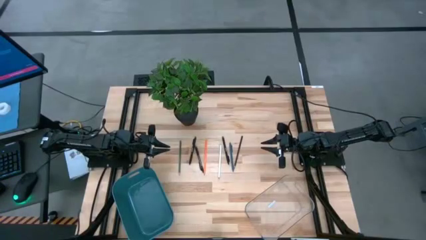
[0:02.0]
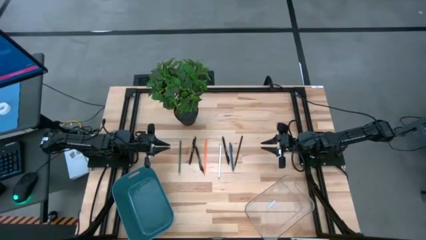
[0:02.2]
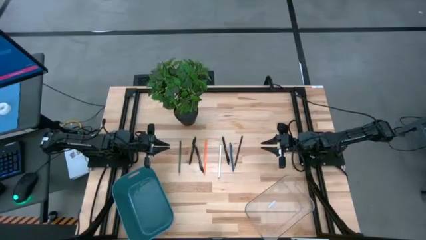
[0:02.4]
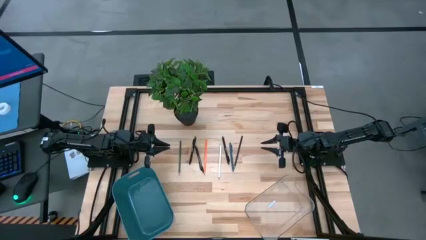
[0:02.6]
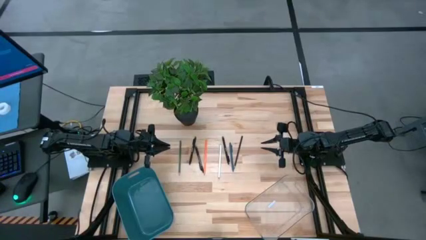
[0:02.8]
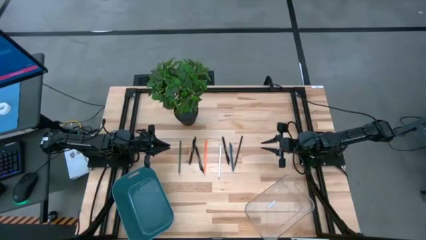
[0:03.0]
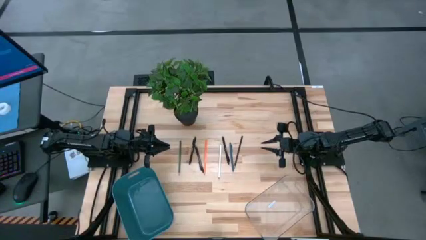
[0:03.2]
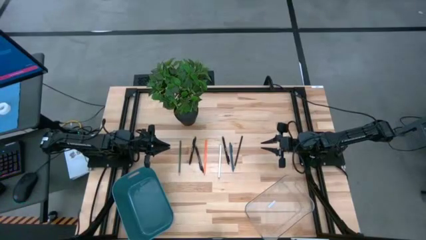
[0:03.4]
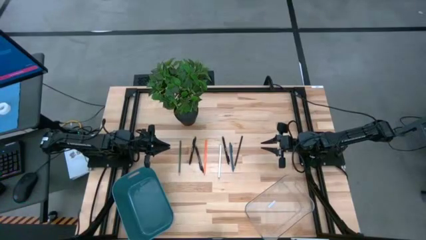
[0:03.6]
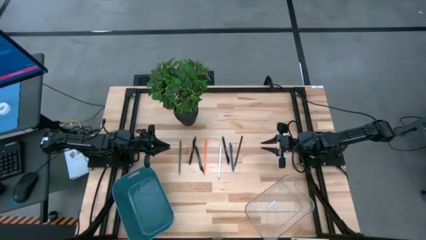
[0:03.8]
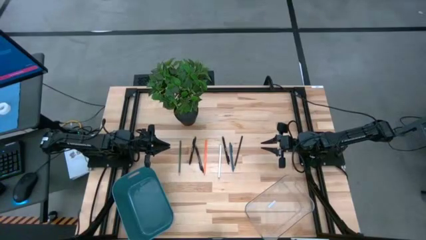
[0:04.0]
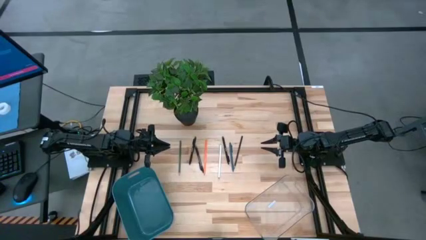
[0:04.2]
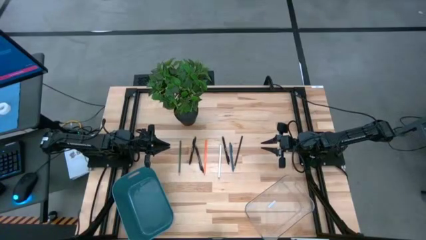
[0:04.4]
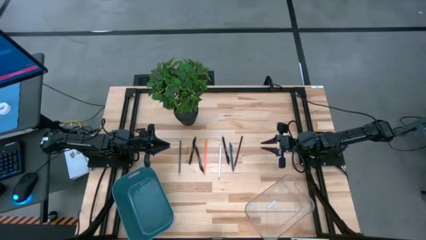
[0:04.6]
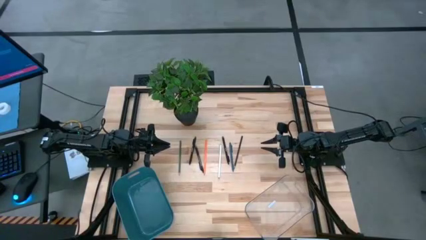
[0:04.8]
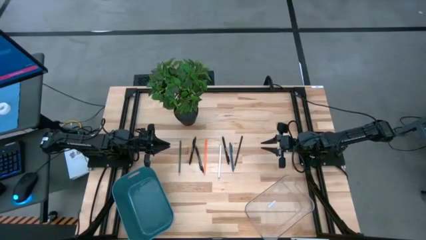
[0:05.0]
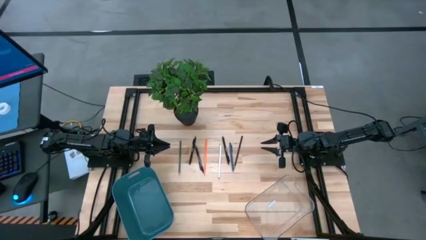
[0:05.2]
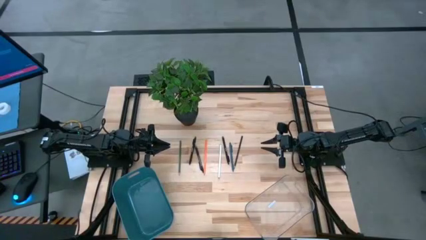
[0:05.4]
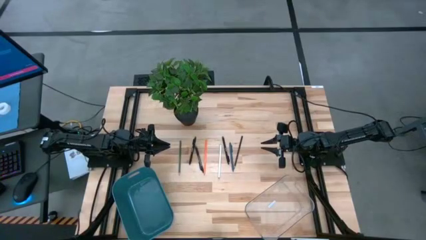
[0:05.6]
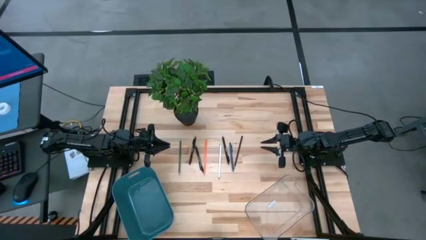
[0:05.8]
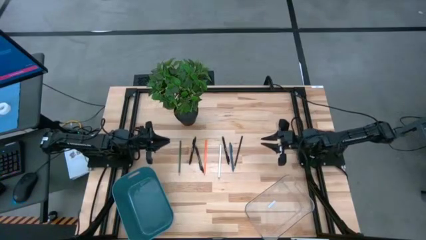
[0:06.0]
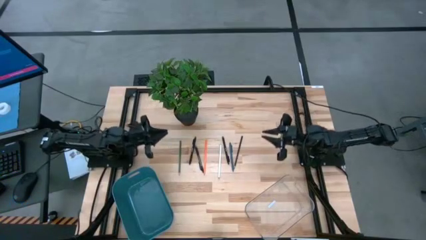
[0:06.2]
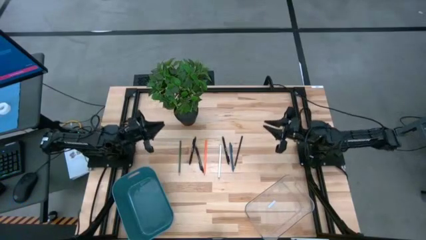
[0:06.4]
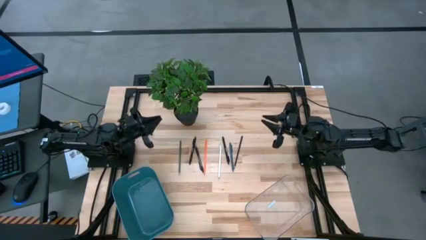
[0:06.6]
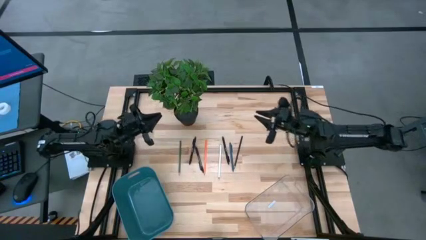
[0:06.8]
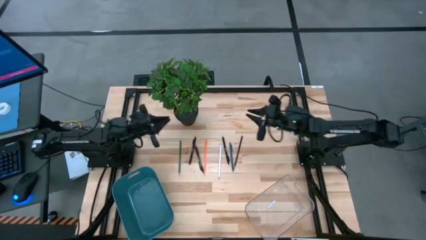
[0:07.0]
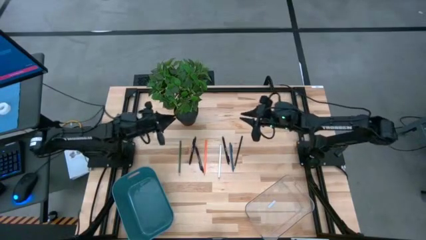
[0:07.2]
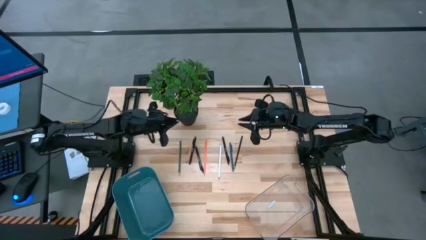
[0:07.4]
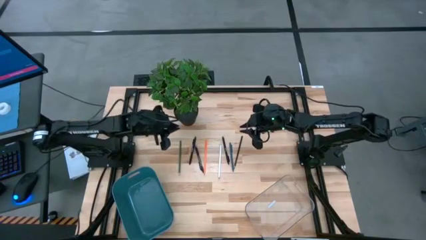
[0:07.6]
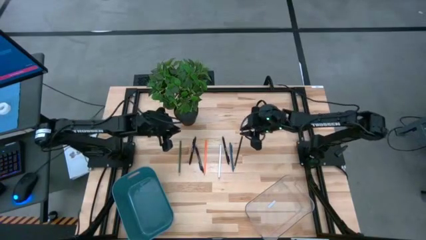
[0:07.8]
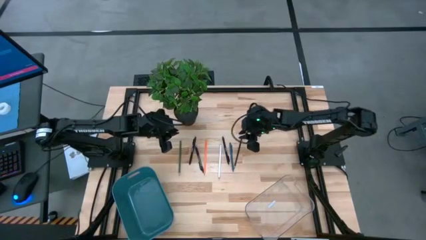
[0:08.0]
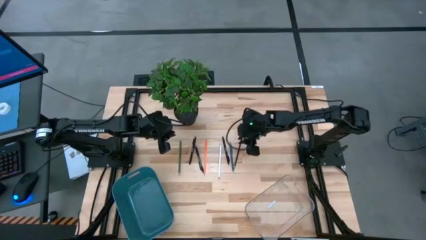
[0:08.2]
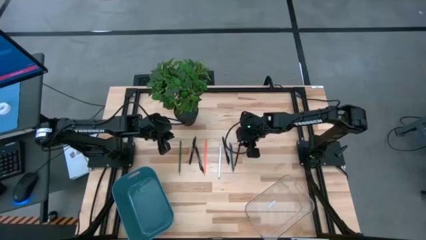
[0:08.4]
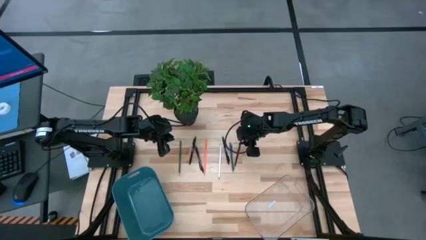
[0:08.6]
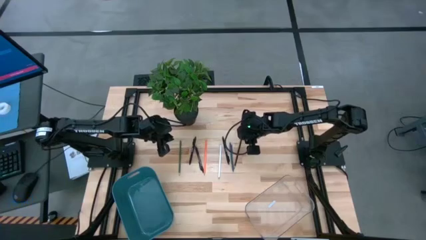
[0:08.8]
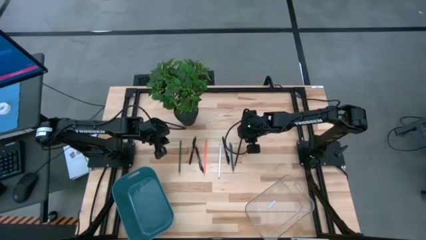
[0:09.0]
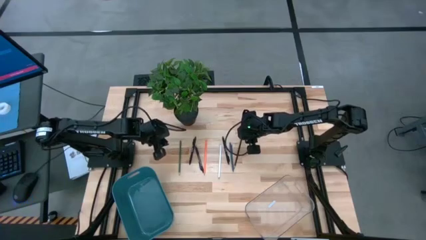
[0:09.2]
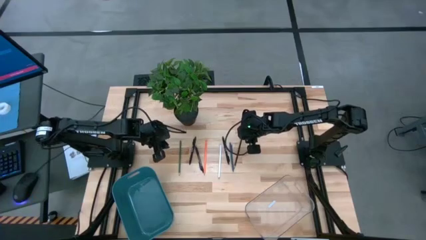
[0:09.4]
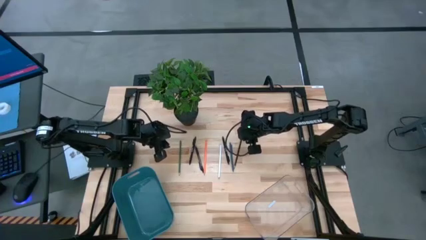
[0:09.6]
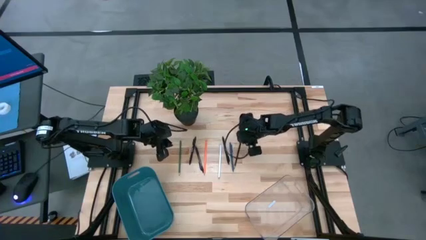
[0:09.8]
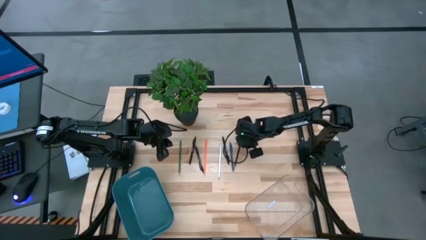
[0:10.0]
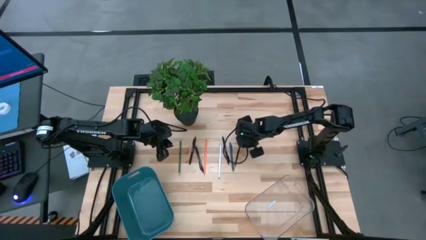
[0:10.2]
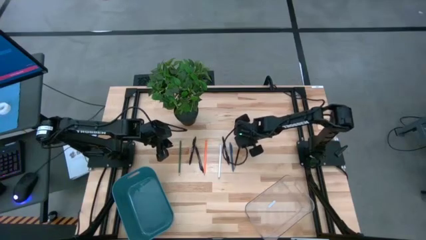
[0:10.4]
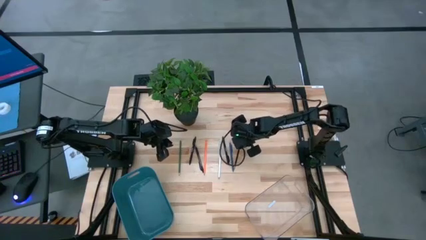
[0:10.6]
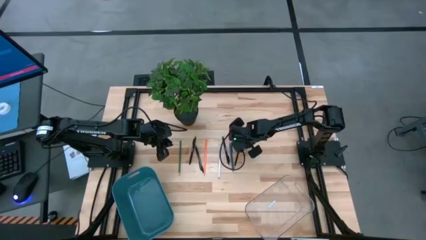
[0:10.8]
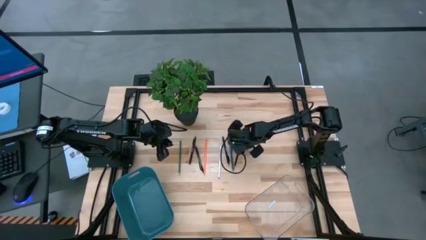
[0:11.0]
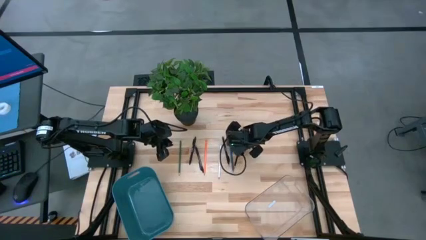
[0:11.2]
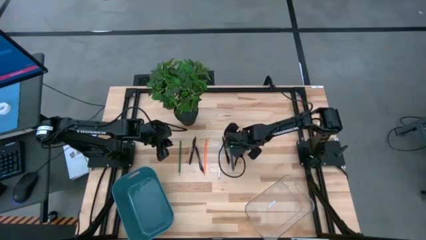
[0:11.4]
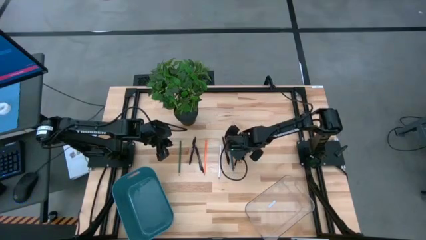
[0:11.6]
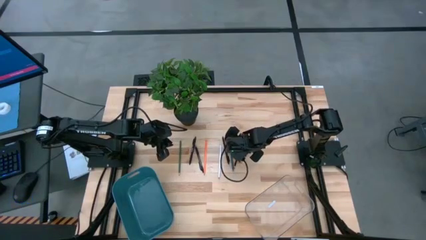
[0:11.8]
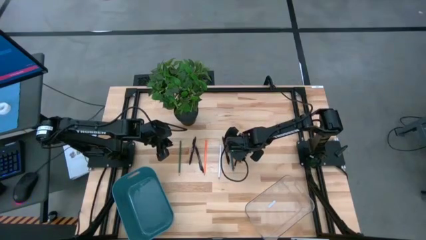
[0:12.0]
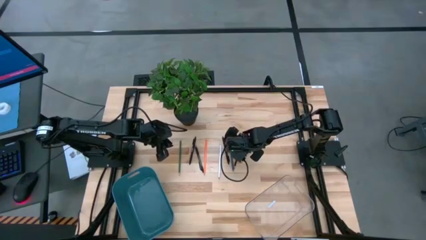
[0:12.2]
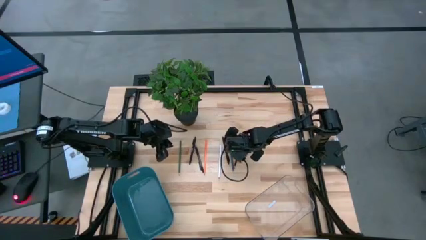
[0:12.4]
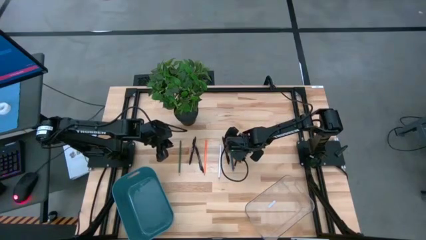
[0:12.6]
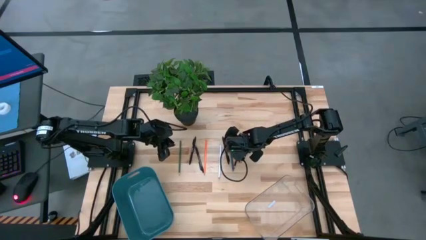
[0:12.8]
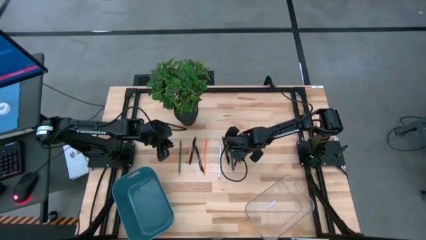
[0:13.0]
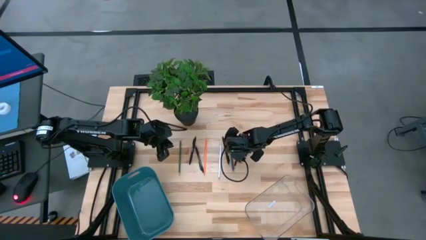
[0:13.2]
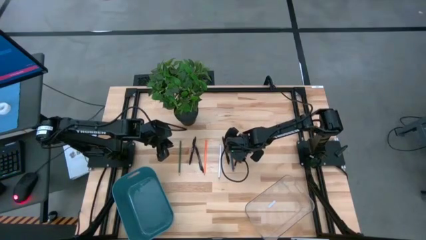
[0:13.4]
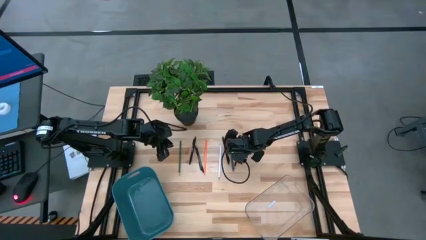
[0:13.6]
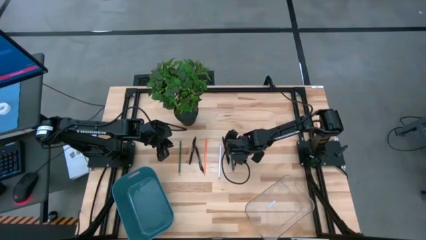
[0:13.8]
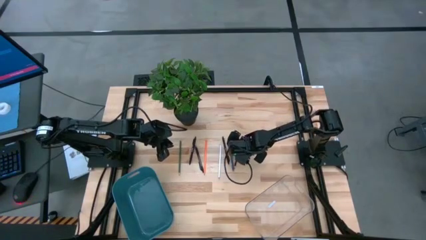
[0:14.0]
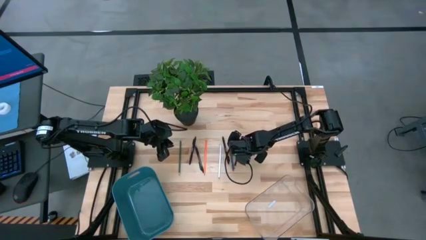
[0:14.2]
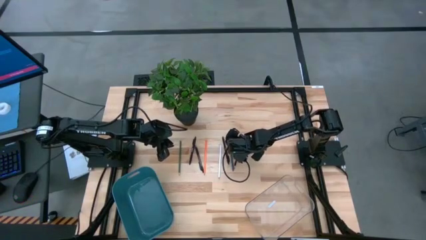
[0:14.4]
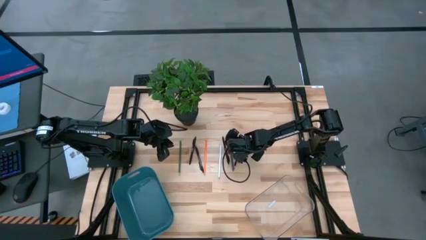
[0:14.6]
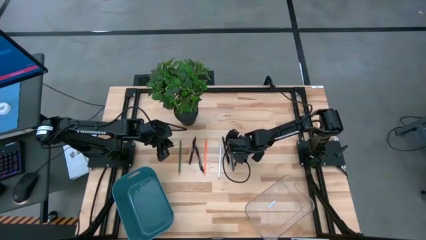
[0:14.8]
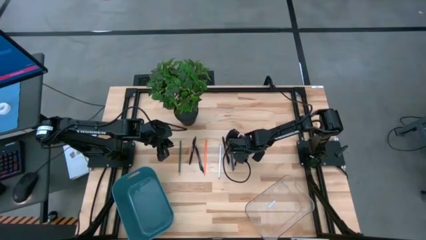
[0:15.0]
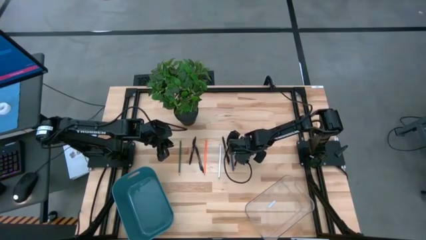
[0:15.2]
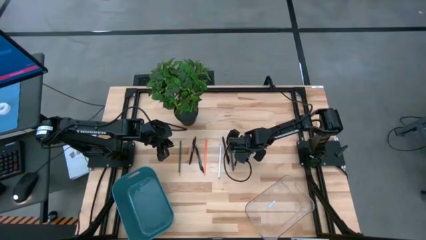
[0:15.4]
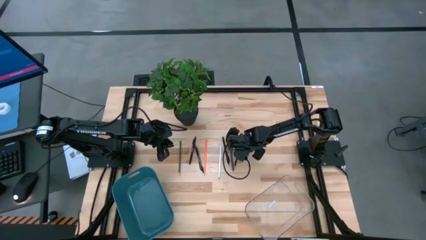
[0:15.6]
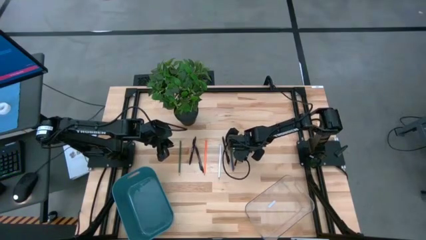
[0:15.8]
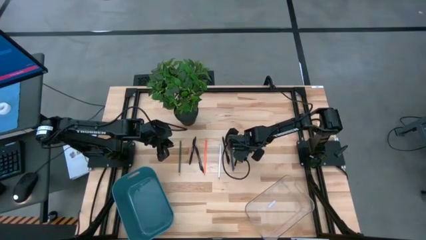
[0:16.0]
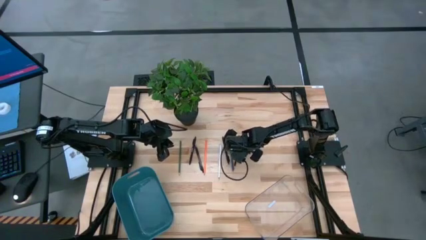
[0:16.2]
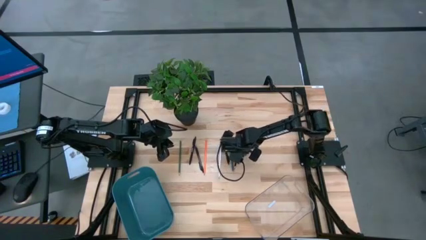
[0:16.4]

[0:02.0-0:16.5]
Task: Sort pens & pencils
Put the black pencil into the transparent bin

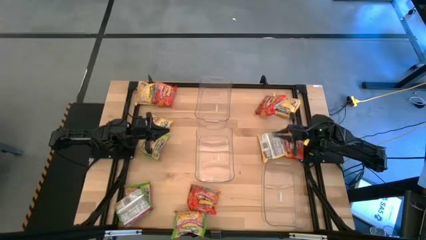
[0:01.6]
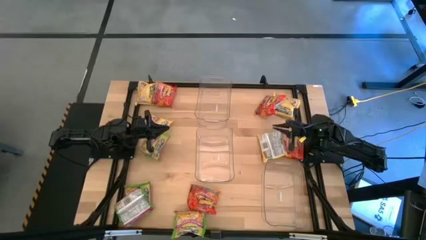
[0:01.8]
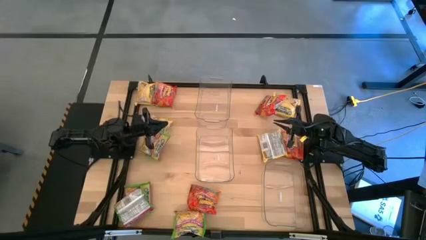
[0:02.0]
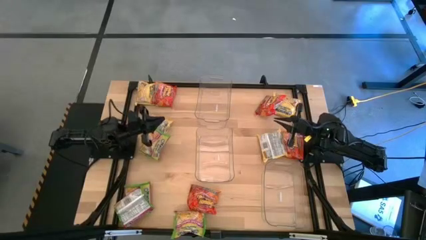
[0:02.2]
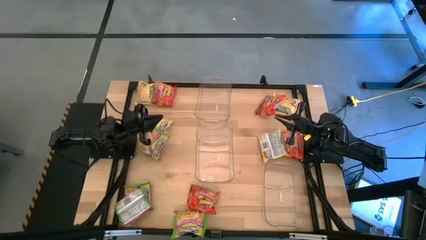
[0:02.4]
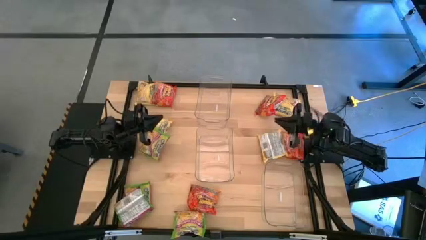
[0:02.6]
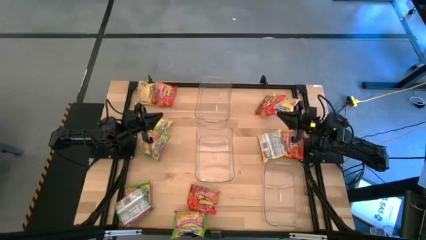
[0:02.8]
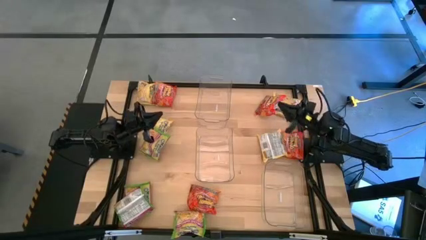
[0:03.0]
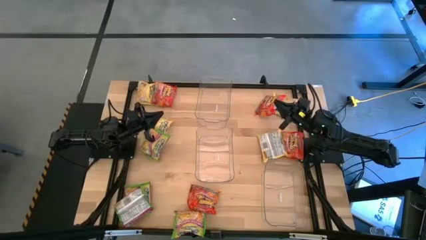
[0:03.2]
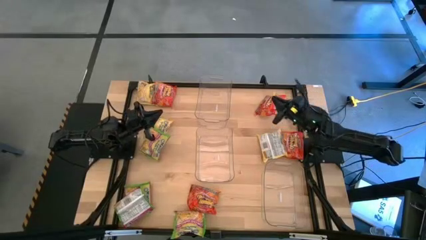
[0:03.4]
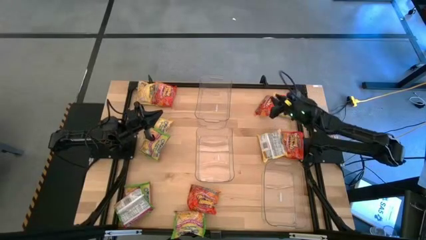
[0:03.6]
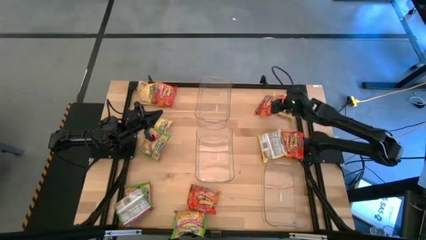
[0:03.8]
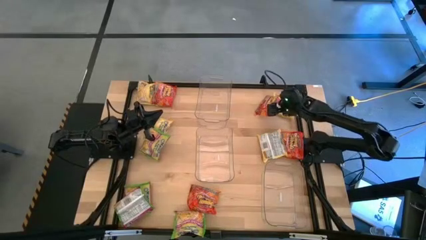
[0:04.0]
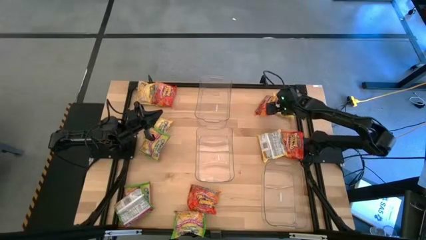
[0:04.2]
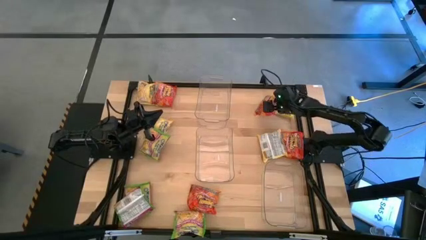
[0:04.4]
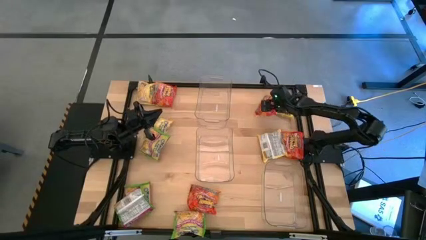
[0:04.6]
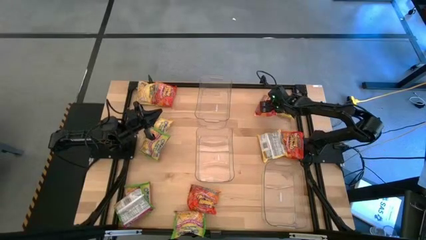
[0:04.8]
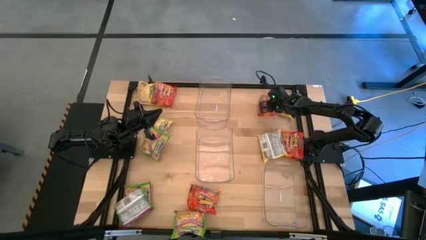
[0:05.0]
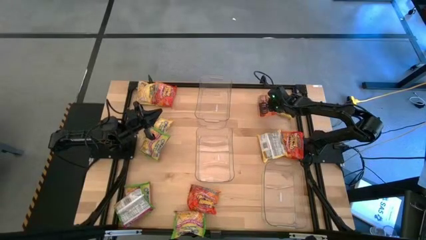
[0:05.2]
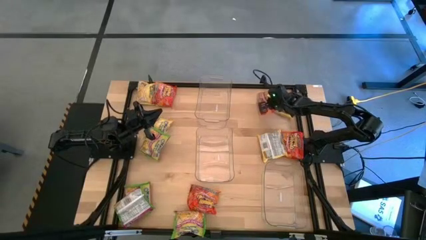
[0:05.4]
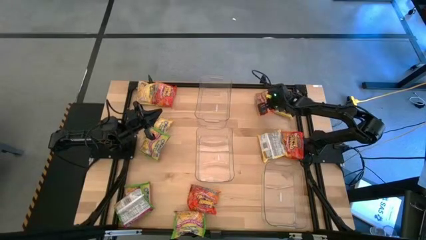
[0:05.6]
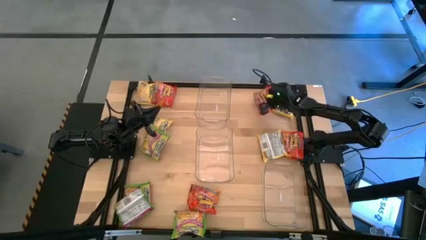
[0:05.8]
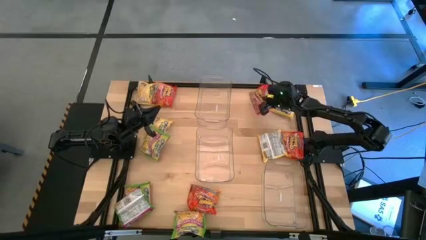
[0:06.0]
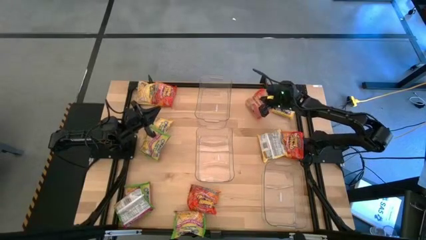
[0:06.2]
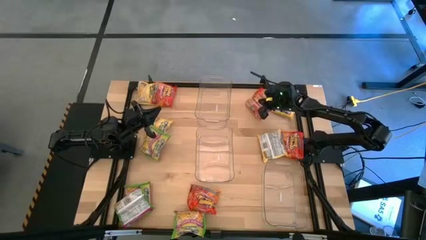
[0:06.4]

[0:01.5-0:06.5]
Task: Sort Maruchan noodles
Put the orange noodle pack into the top transparent bin
